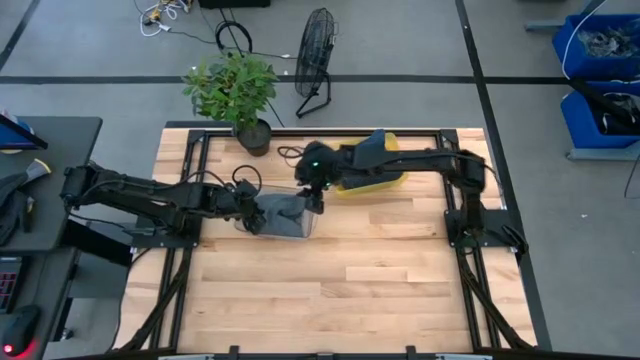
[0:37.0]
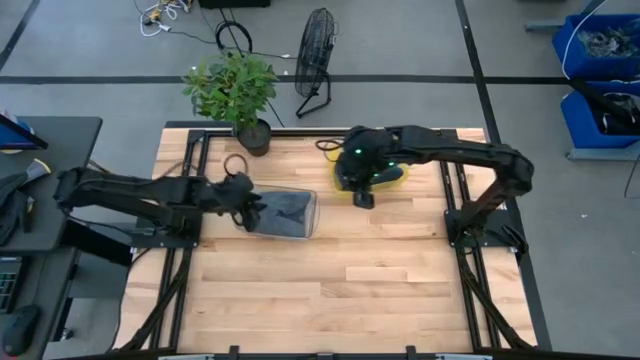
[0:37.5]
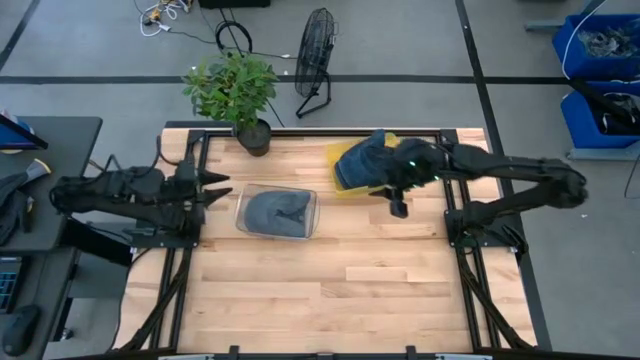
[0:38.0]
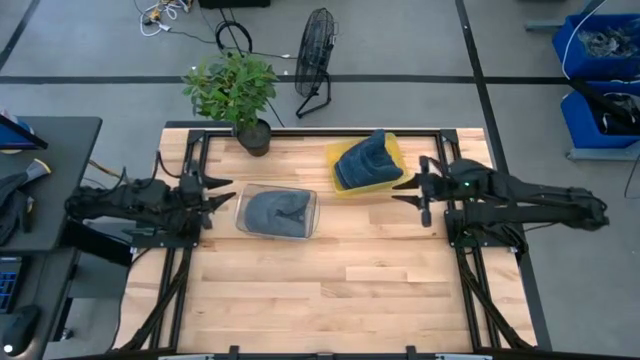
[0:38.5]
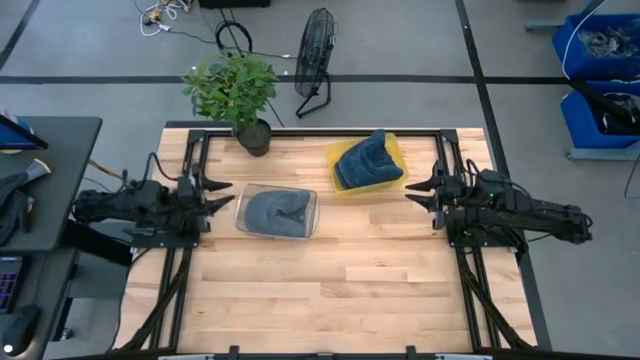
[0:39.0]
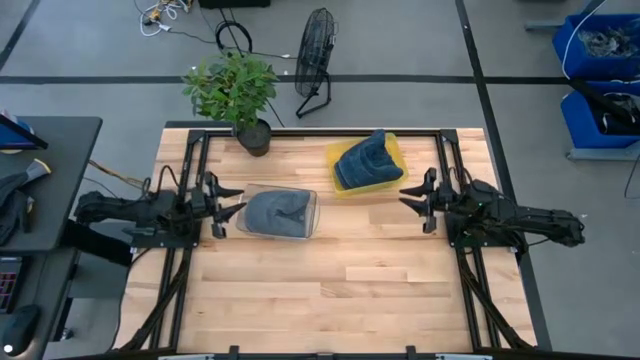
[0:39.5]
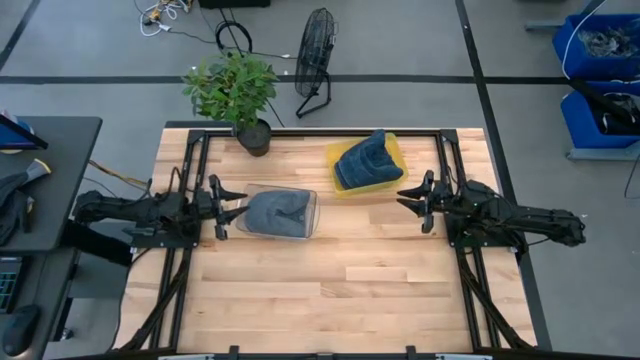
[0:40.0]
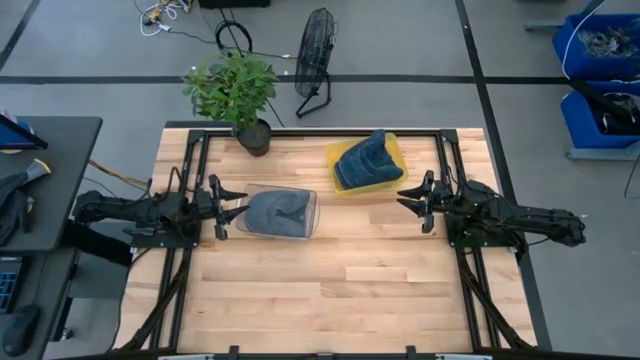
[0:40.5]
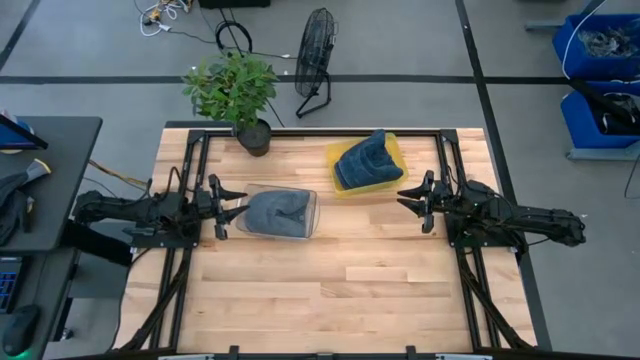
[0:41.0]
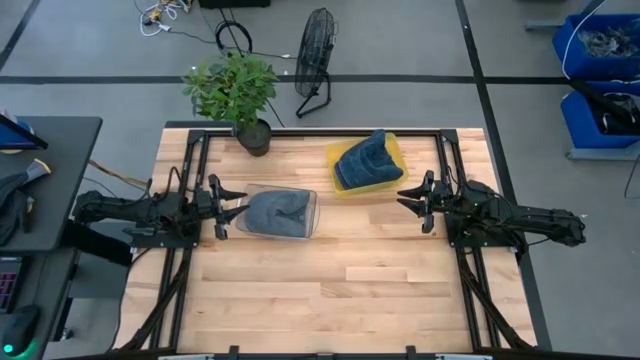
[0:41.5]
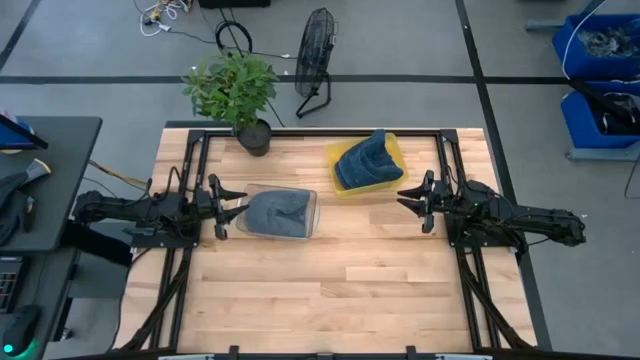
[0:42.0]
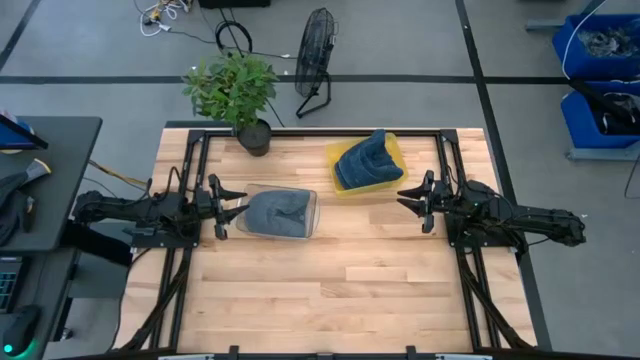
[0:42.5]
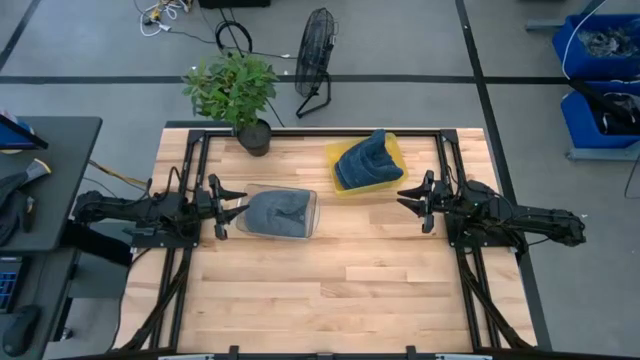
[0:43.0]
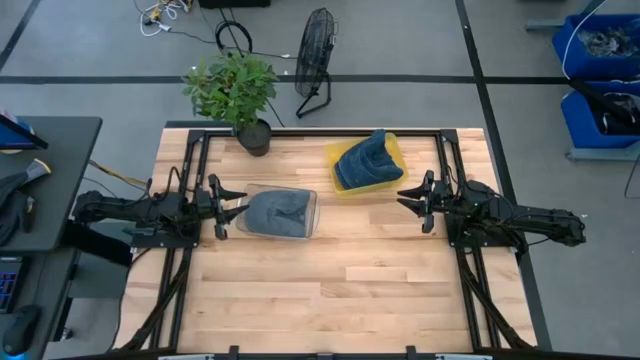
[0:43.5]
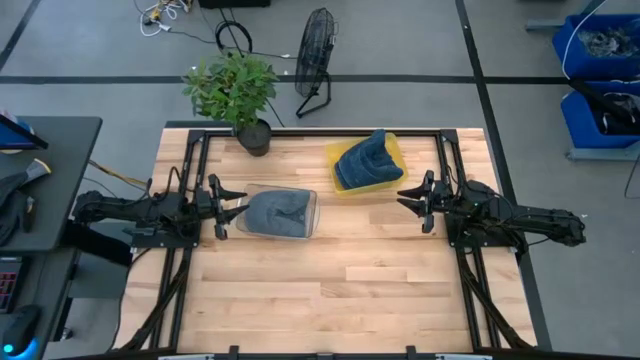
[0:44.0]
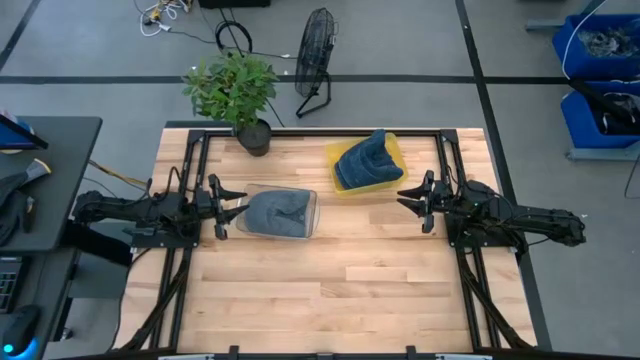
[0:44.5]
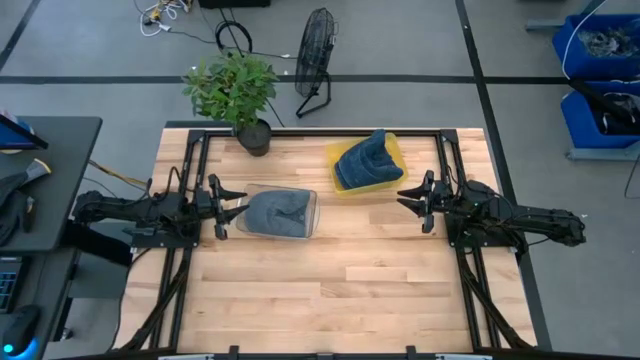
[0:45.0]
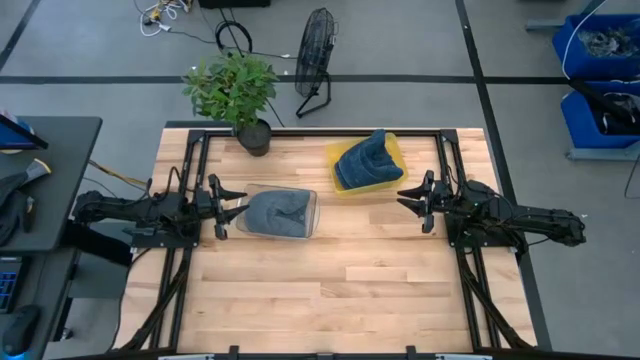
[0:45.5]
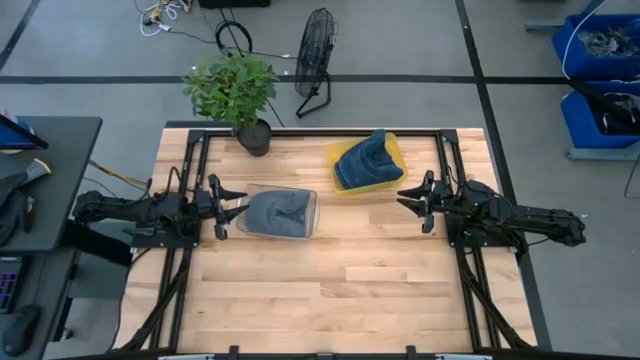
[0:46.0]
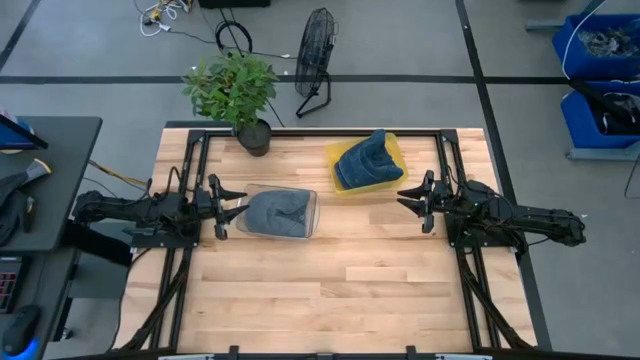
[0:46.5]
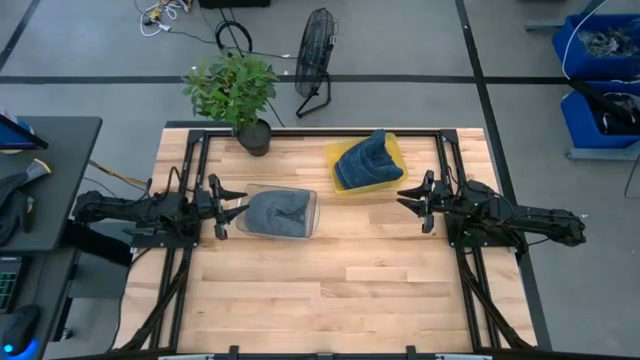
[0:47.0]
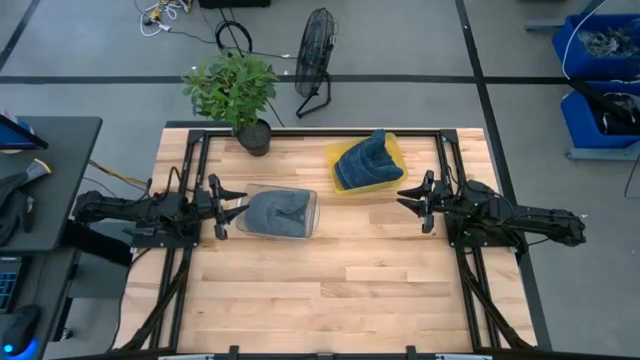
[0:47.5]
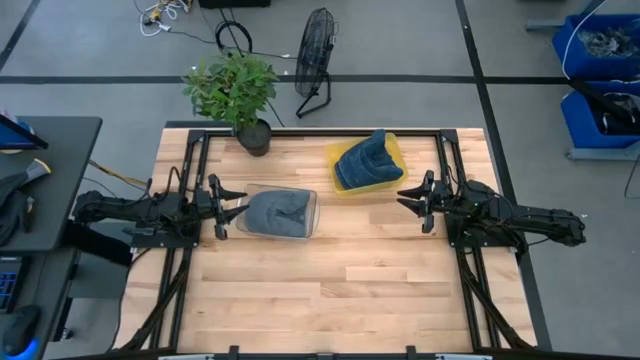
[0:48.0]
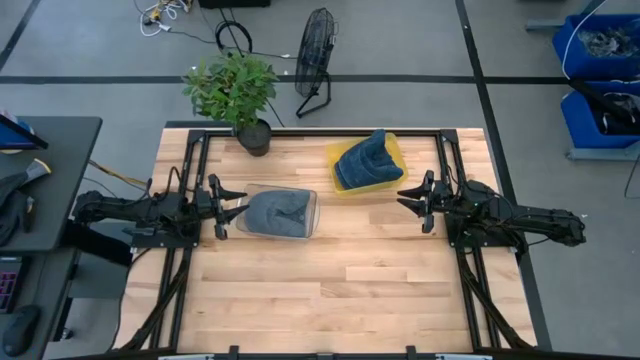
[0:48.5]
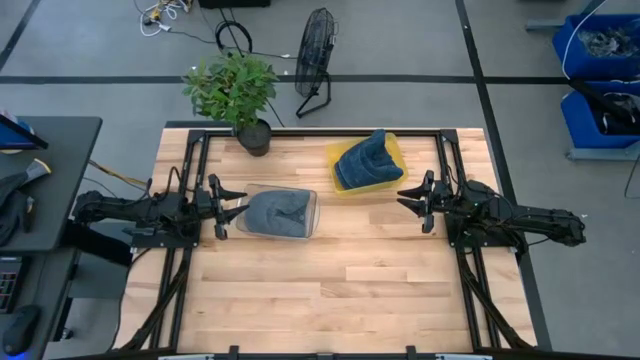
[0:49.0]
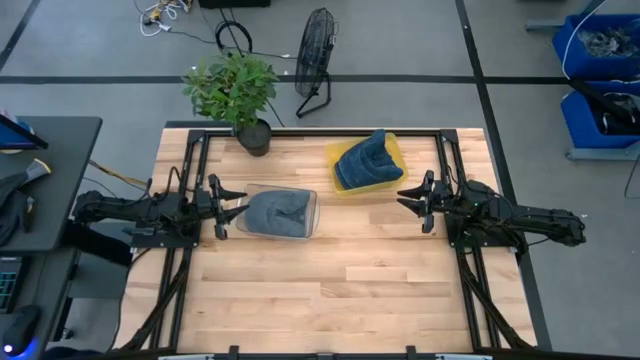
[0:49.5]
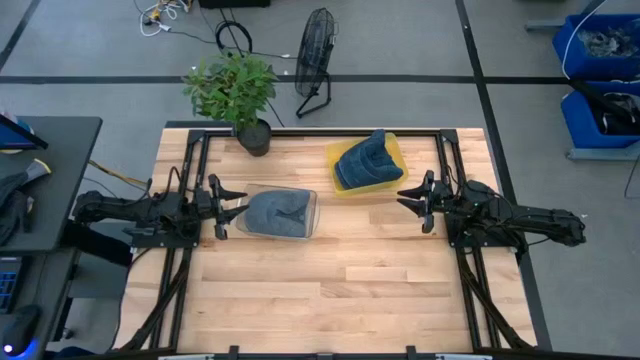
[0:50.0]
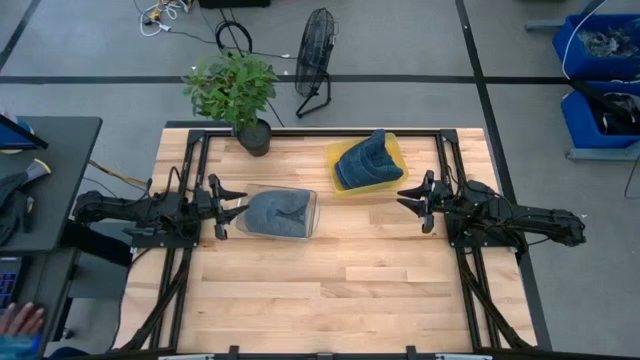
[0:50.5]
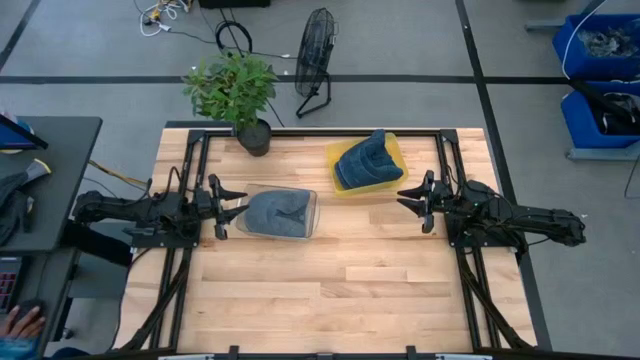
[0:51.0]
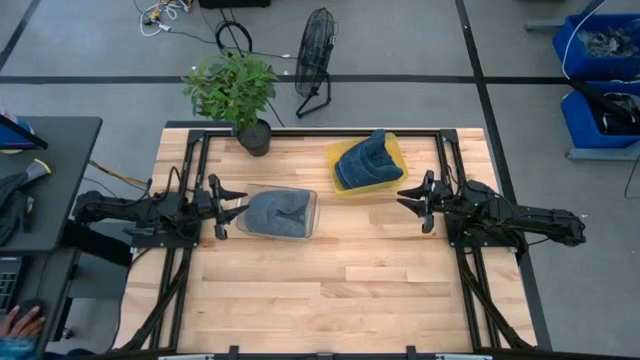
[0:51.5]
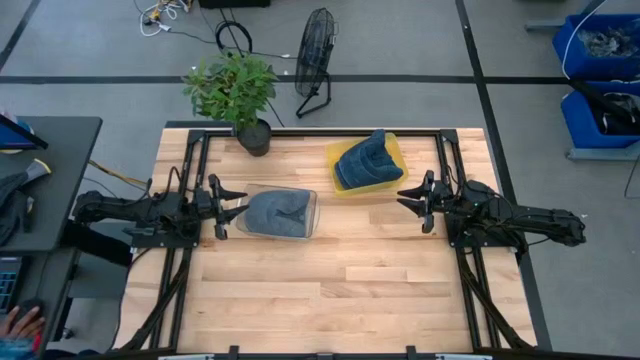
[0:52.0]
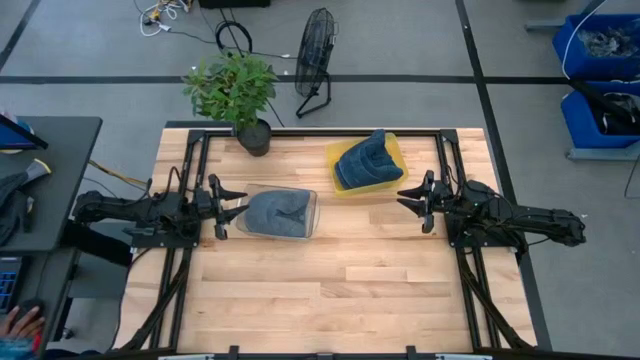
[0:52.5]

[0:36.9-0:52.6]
Task: Pick & Place hat
Return to Home Position

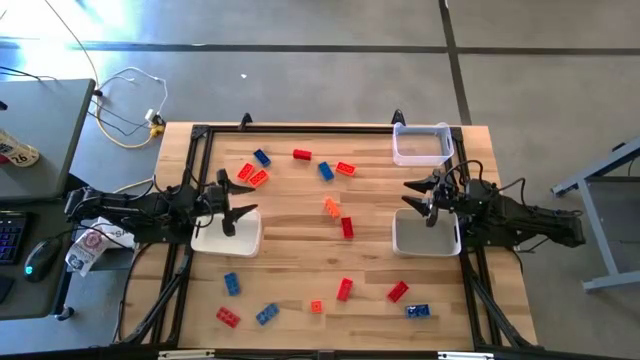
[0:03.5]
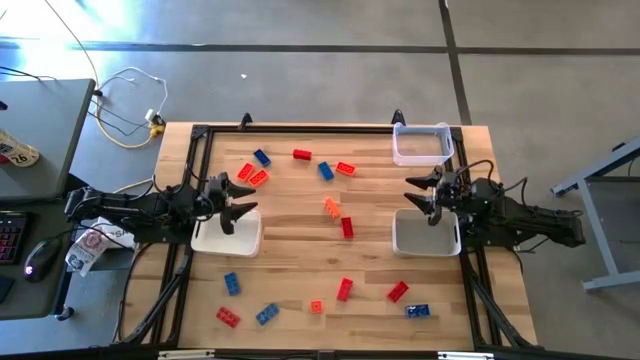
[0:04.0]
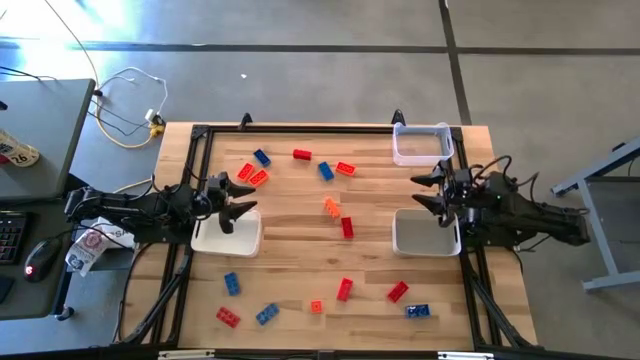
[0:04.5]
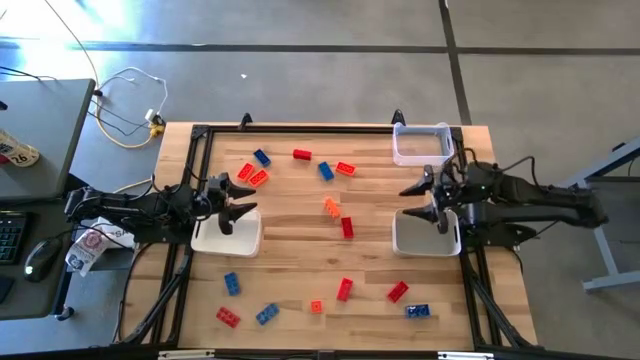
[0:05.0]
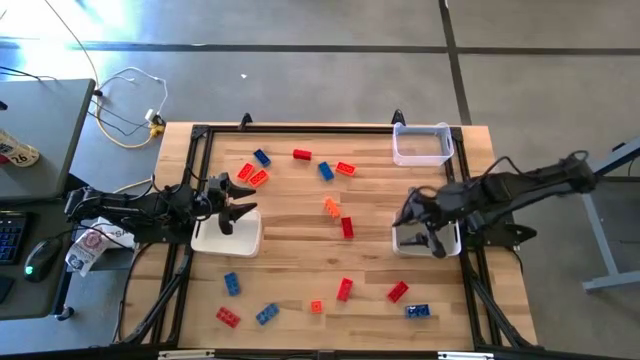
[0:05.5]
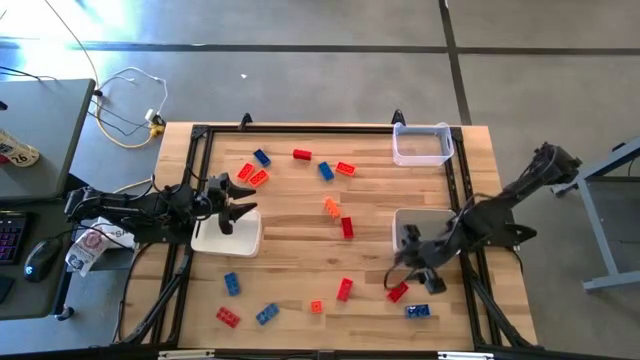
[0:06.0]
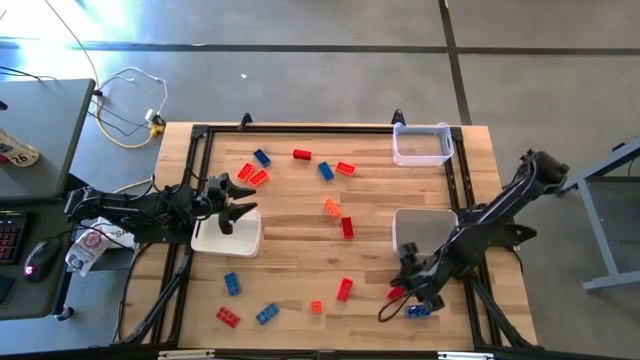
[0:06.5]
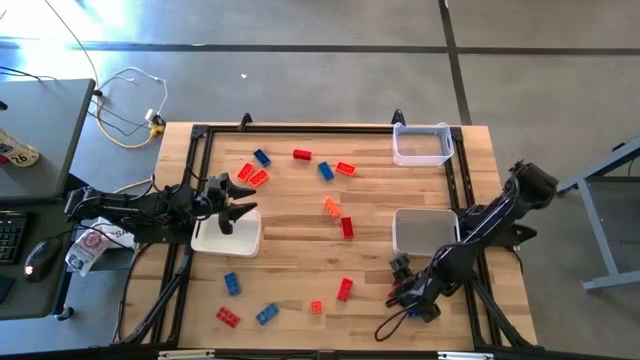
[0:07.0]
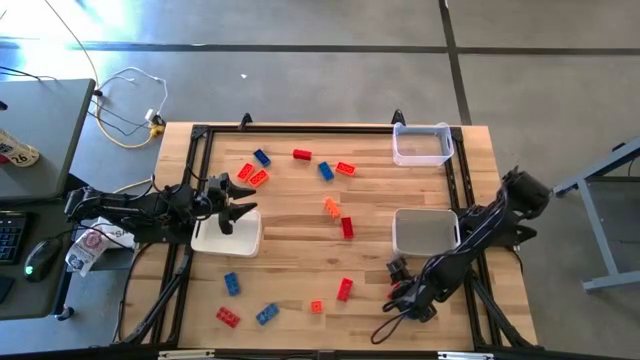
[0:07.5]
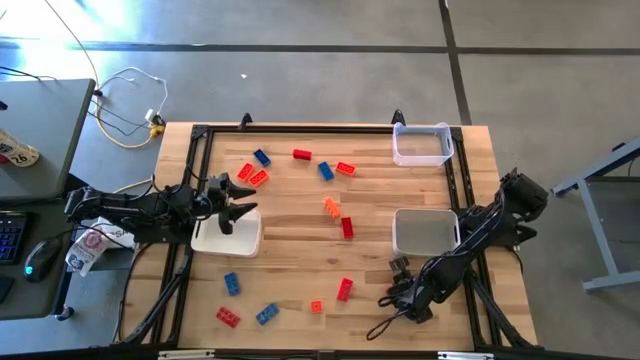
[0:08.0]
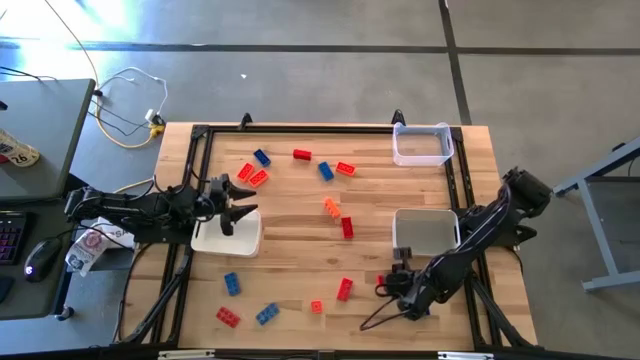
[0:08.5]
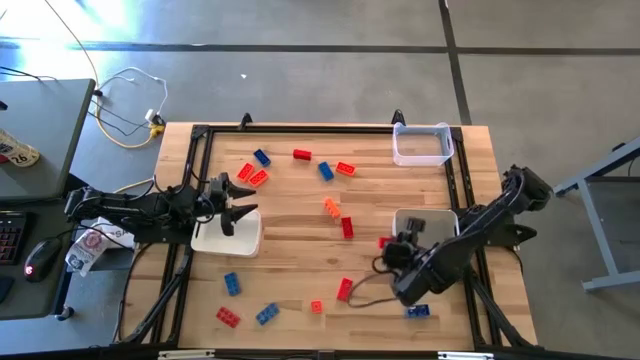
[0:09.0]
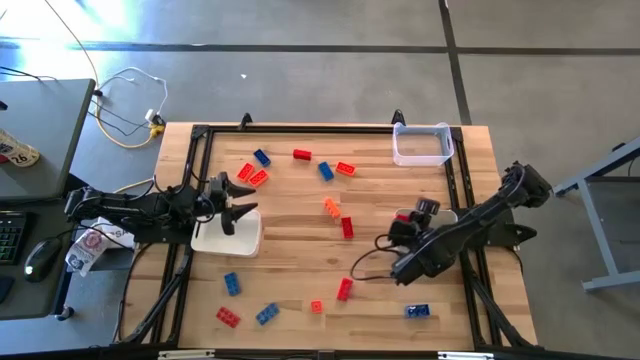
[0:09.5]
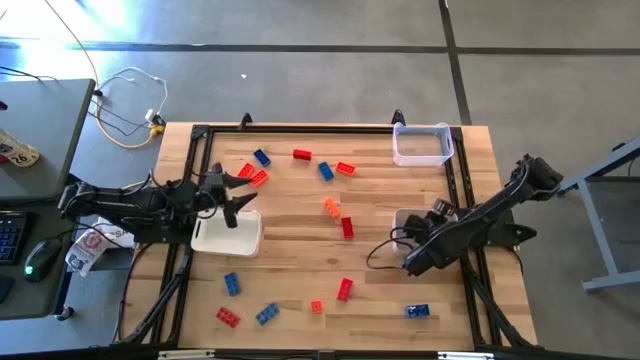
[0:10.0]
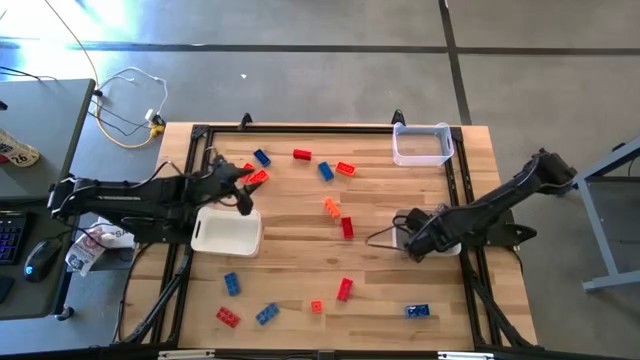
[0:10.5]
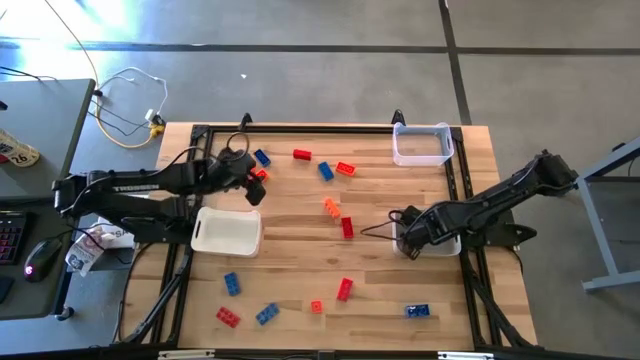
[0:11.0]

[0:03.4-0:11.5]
Task: Sort & place blocks by color
Put the red game piece into the gray bin
